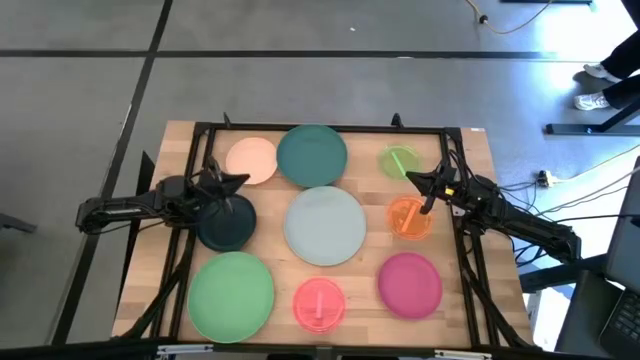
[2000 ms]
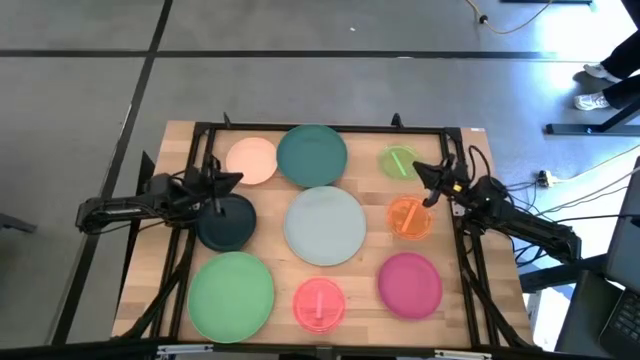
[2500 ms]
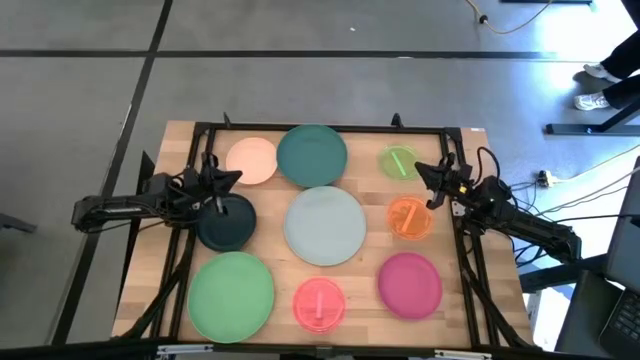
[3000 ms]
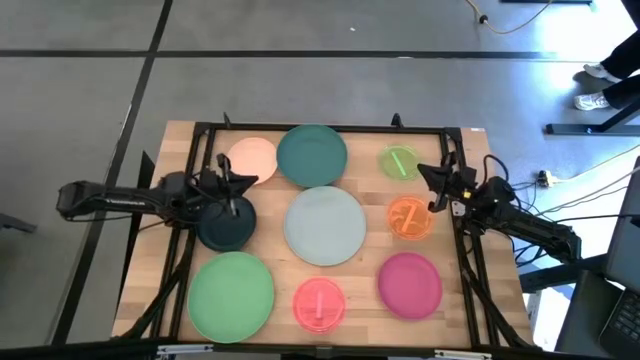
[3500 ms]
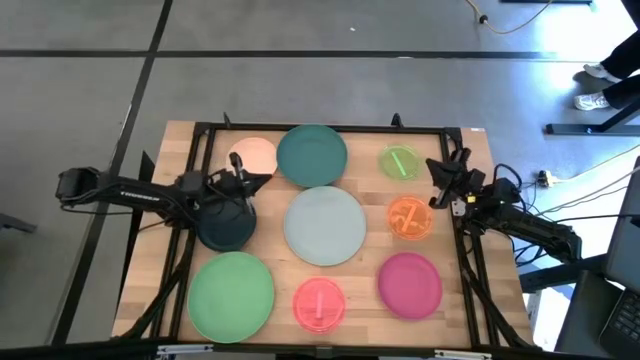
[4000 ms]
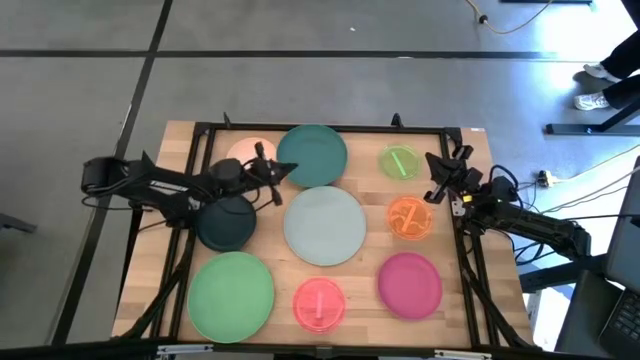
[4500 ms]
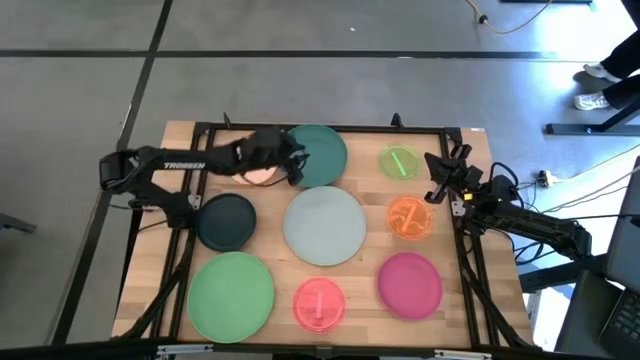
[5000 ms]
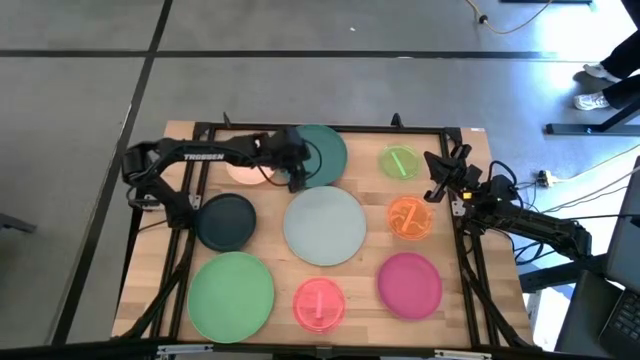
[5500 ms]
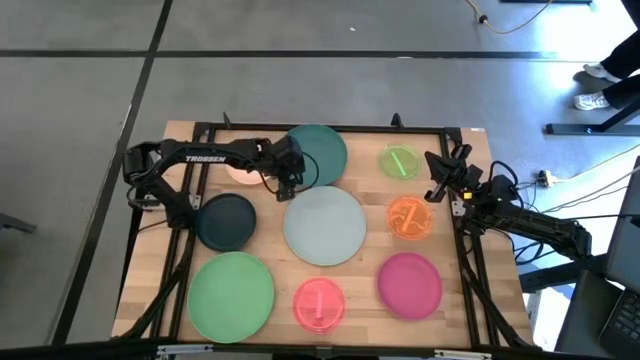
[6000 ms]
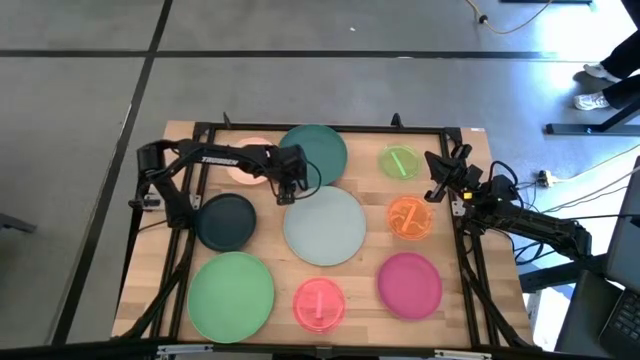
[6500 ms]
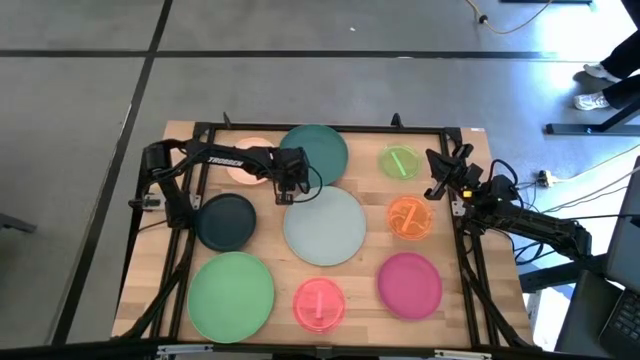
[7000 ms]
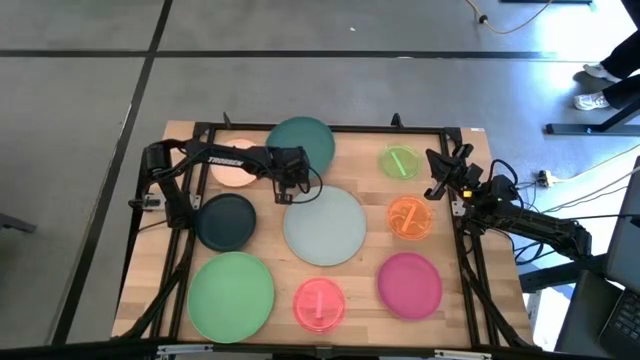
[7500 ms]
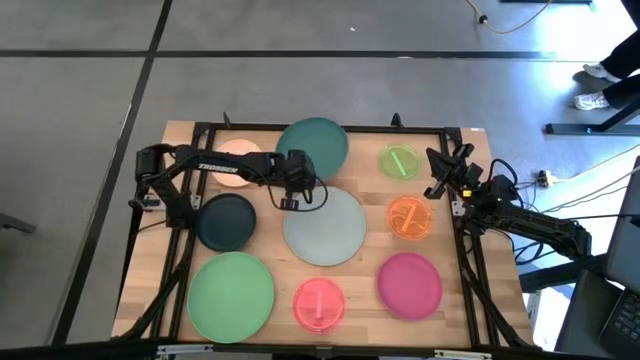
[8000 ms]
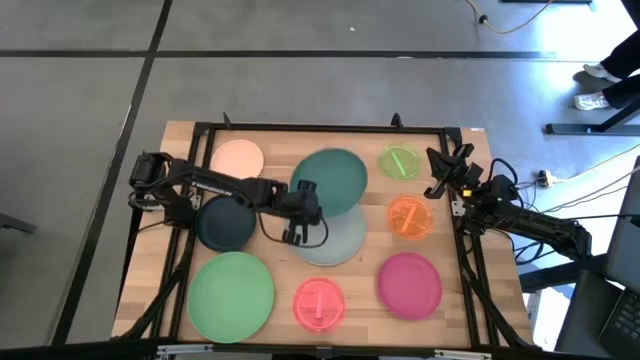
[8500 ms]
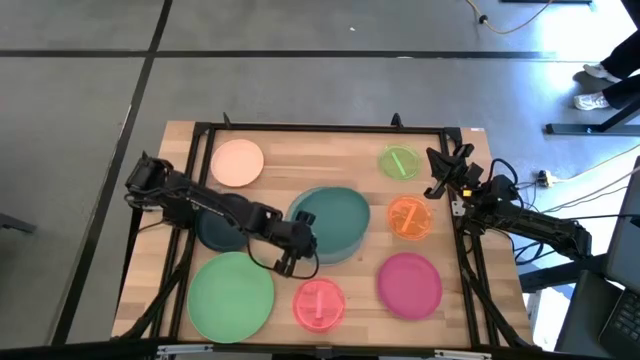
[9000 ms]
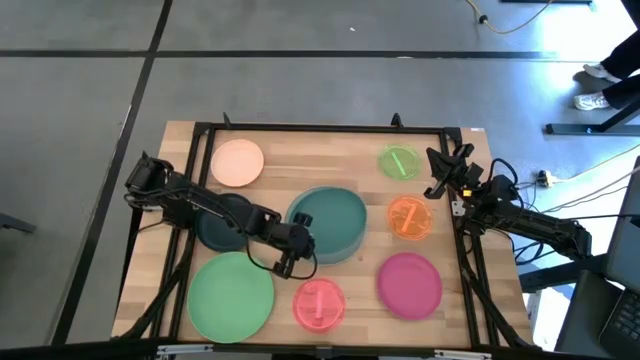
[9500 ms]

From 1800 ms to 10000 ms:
Task: Stack plastic plates
Stack the dark green plate on top of the gray plate

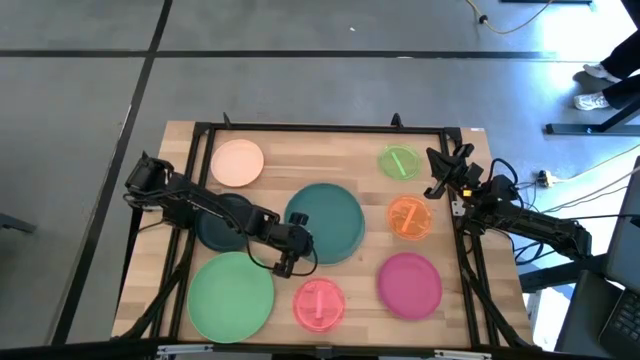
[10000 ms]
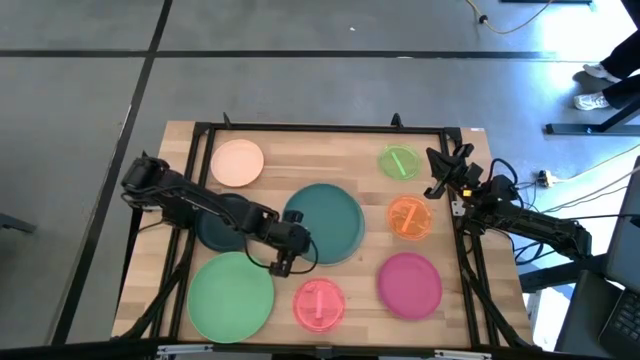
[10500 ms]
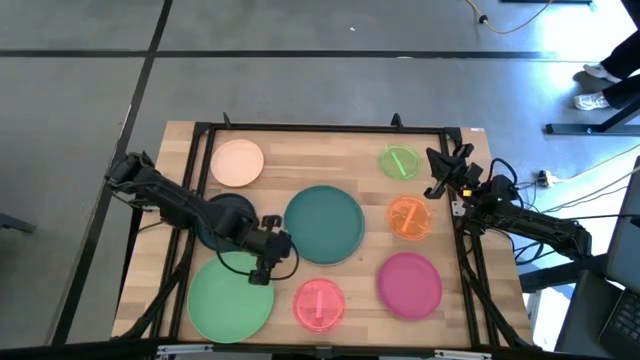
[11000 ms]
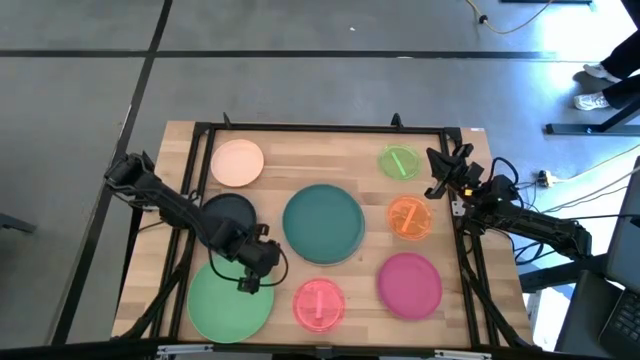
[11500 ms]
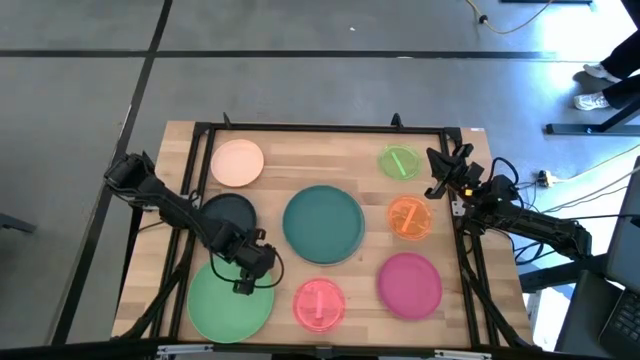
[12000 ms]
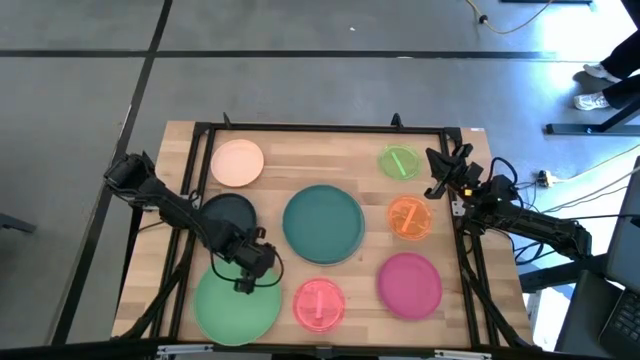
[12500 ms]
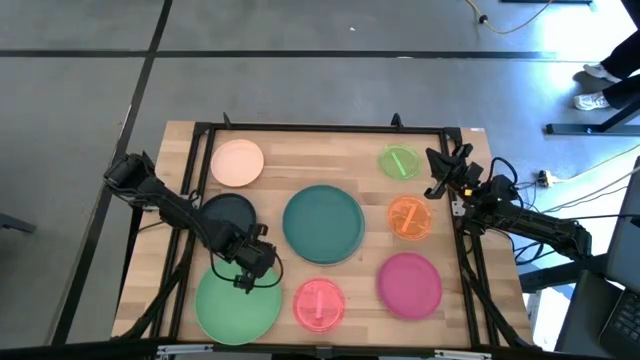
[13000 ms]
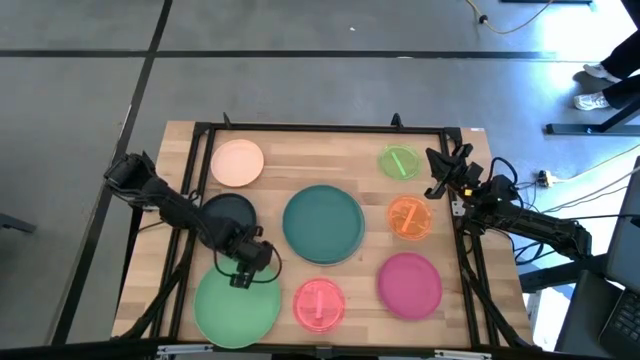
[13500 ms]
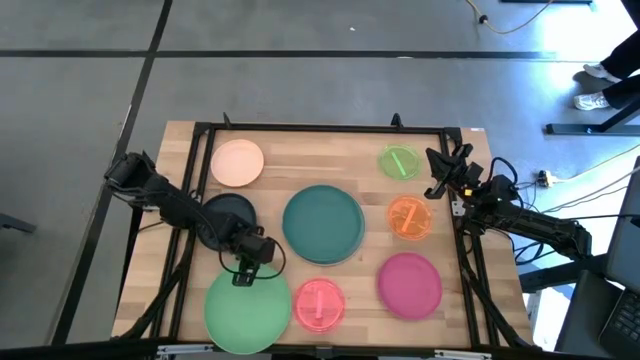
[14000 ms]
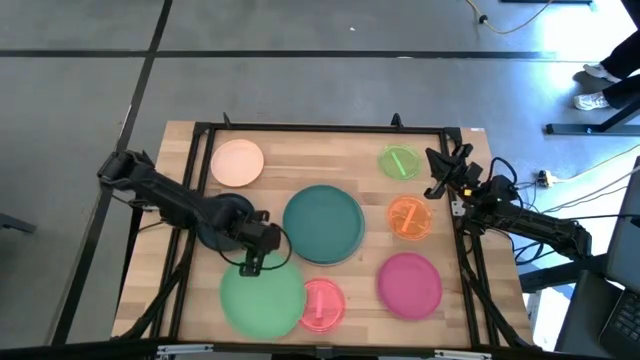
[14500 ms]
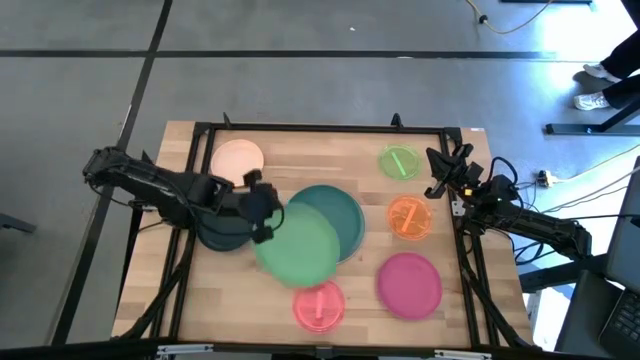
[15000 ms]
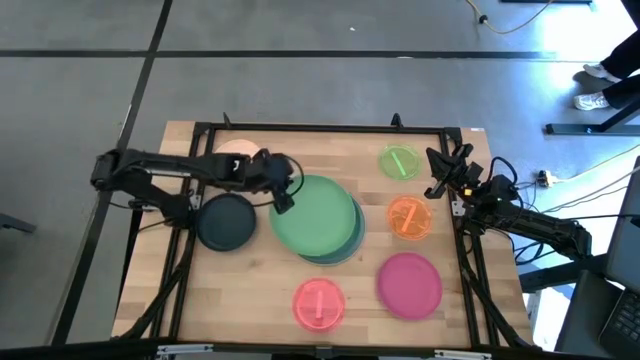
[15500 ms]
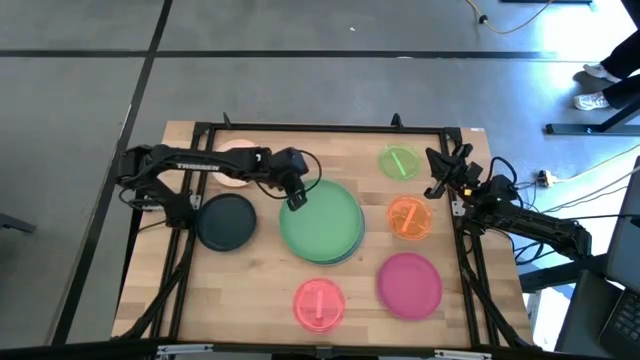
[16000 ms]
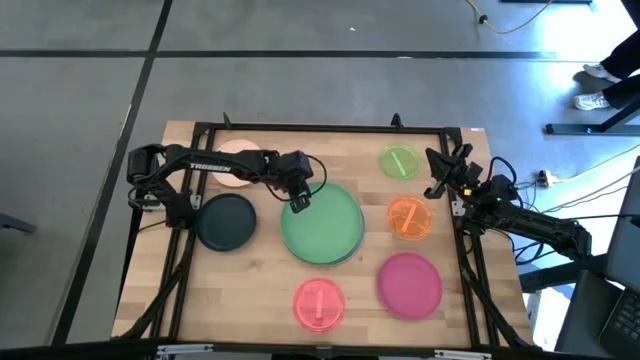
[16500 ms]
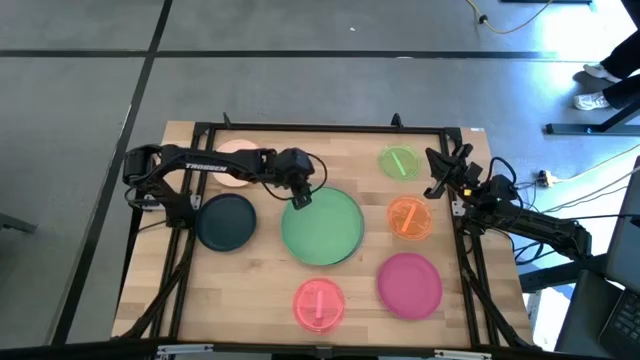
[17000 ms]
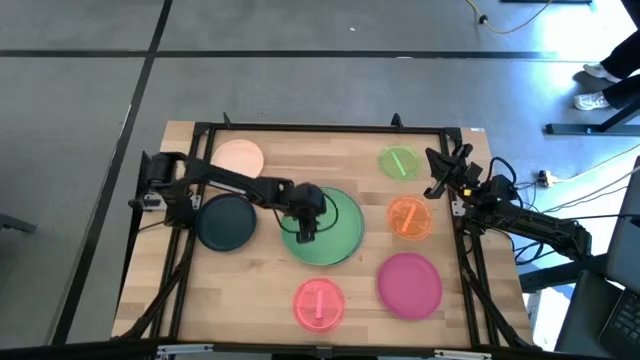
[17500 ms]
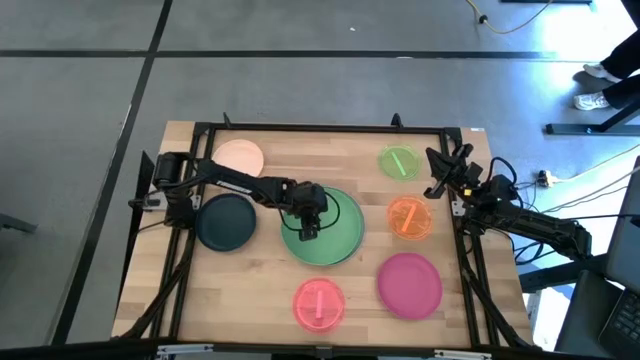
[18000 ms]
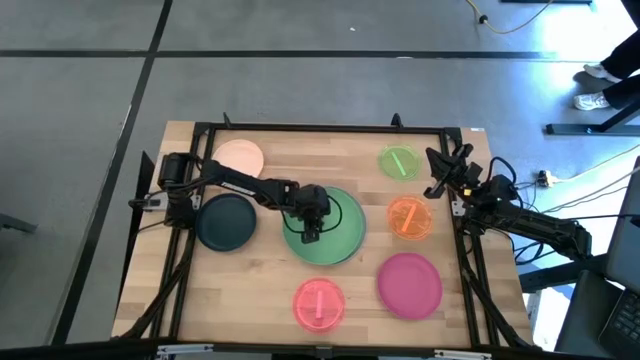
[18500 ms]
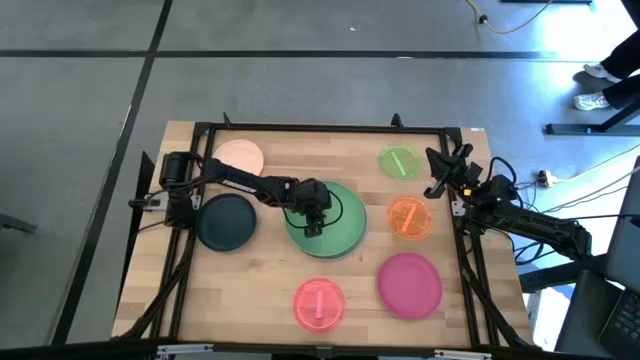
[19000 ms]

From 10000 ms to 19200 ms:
Stack the green plate on top of the dark green plate

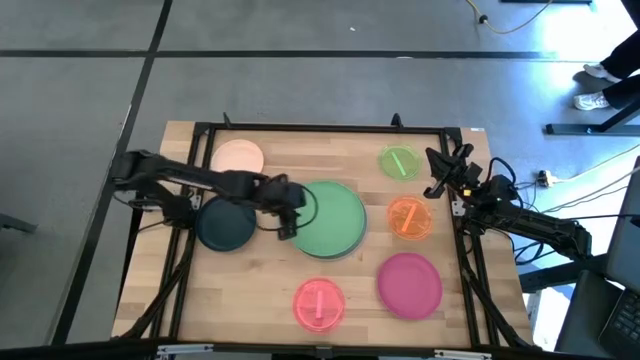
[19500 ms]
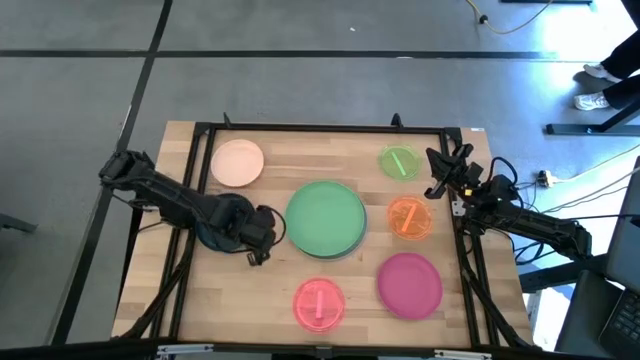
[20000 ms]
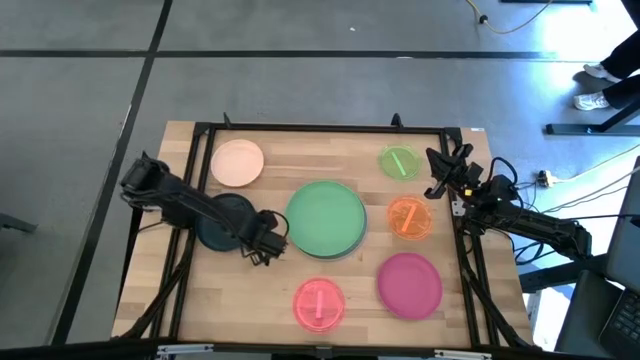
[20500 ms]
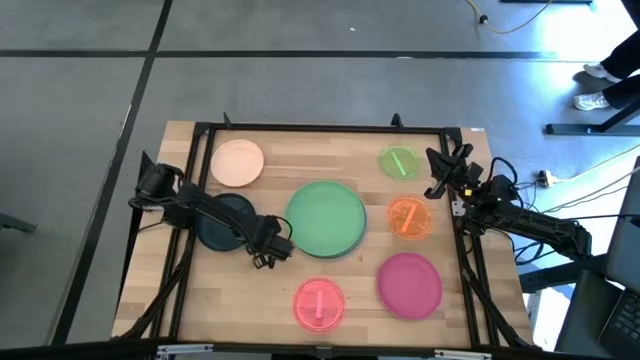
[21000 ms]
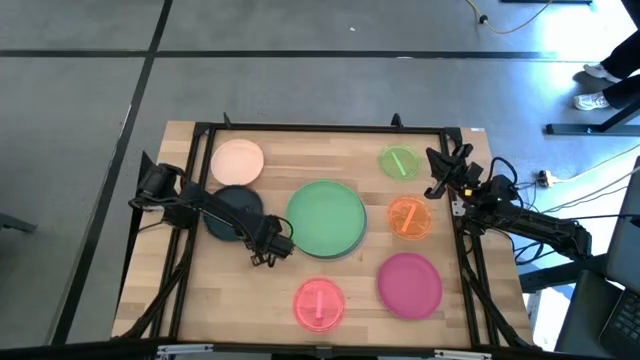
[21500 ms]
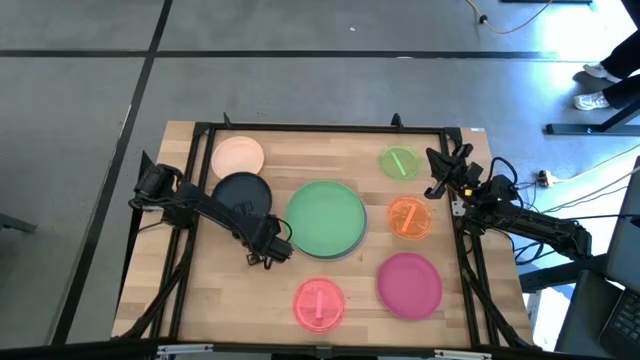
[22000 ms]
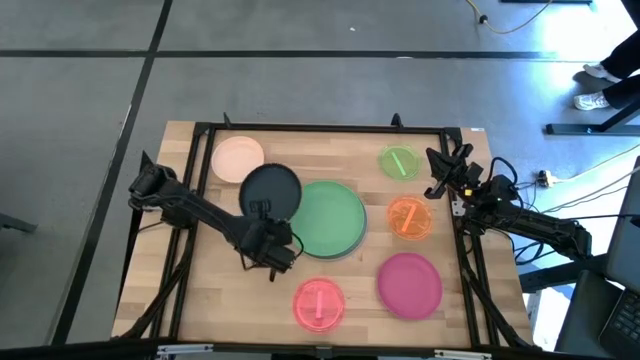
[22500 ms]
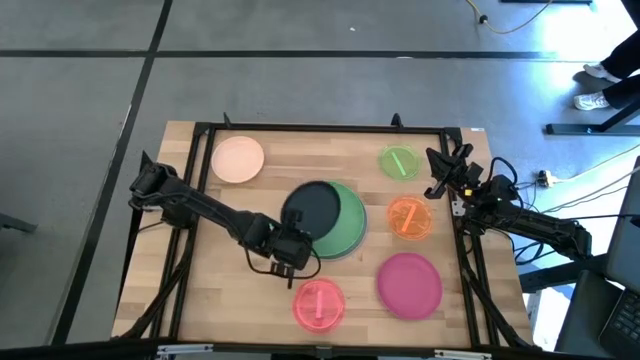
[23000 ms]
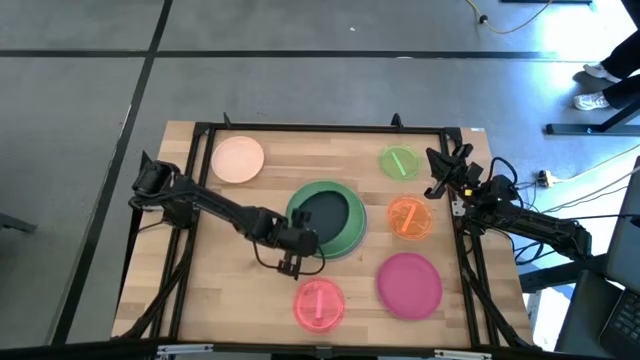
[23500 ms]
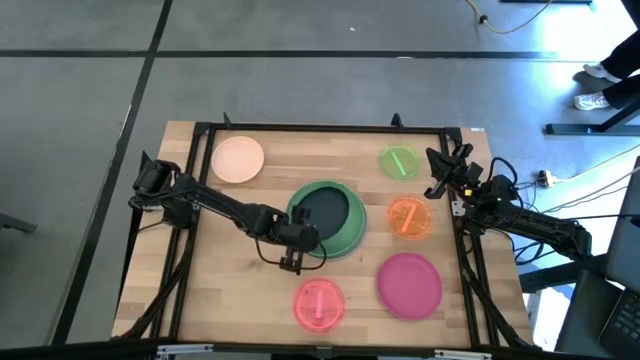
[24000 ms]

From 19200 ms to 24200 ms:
Stack the black plate on top of the green plate
